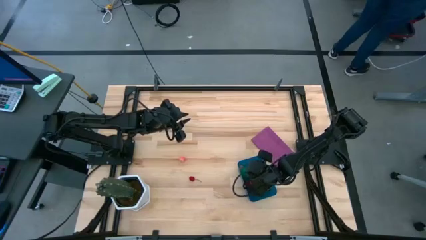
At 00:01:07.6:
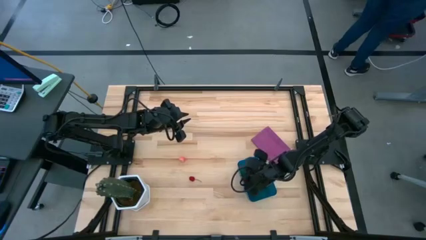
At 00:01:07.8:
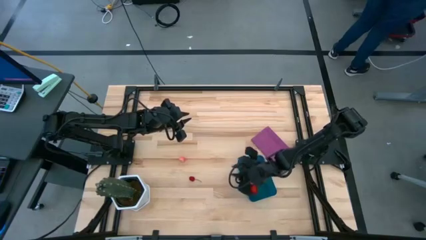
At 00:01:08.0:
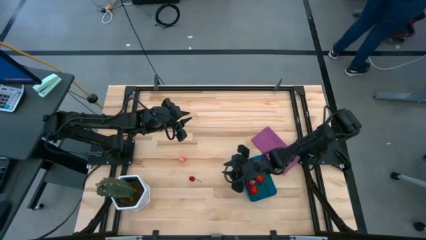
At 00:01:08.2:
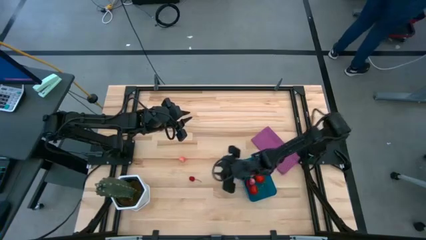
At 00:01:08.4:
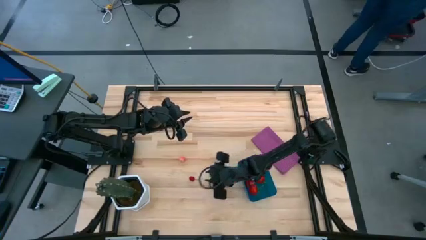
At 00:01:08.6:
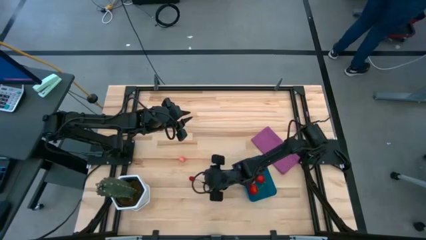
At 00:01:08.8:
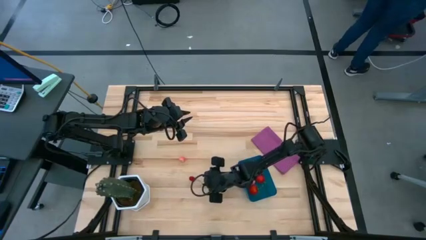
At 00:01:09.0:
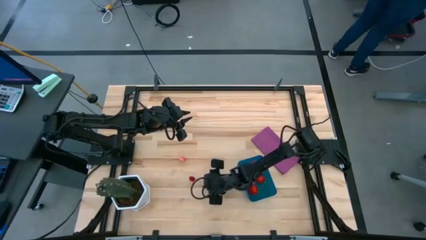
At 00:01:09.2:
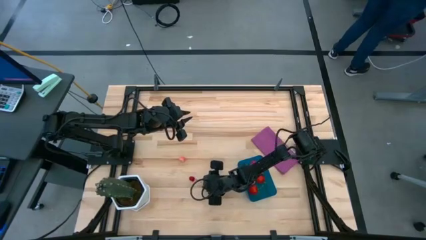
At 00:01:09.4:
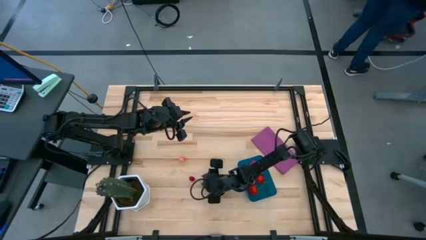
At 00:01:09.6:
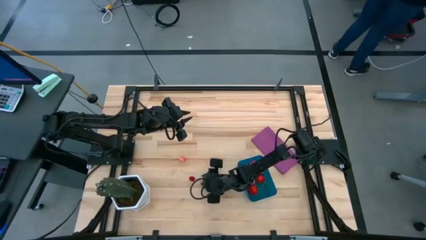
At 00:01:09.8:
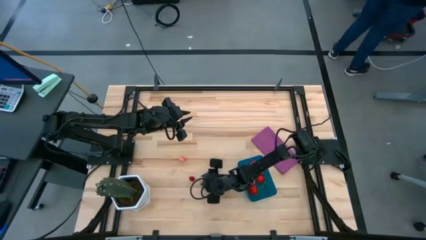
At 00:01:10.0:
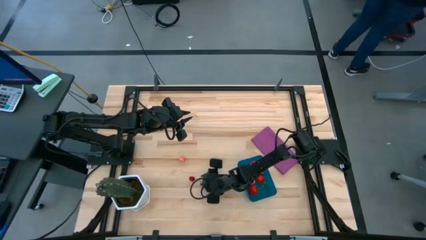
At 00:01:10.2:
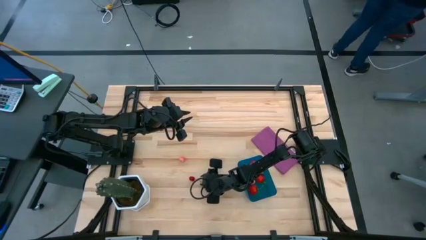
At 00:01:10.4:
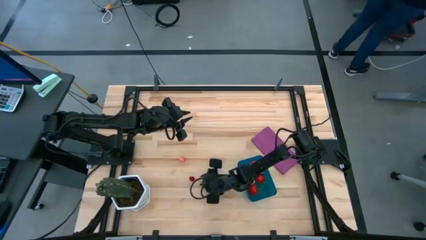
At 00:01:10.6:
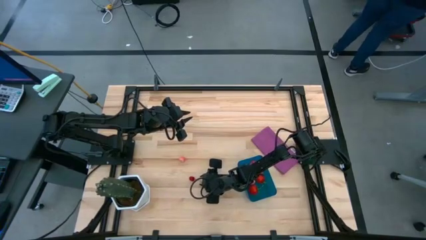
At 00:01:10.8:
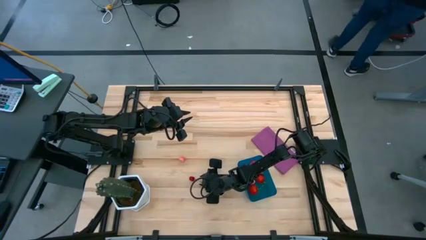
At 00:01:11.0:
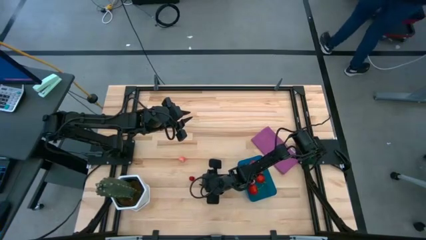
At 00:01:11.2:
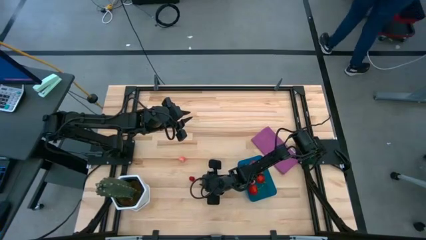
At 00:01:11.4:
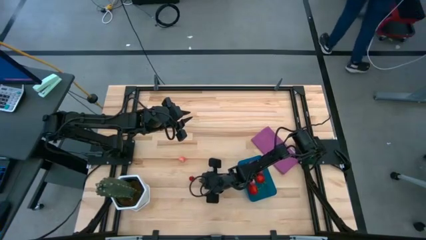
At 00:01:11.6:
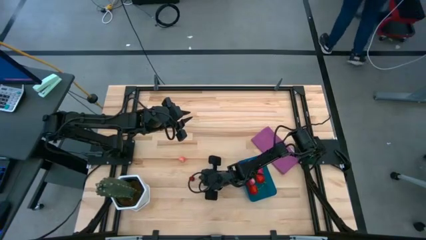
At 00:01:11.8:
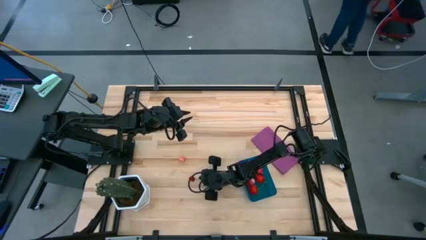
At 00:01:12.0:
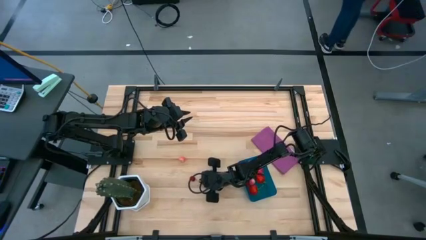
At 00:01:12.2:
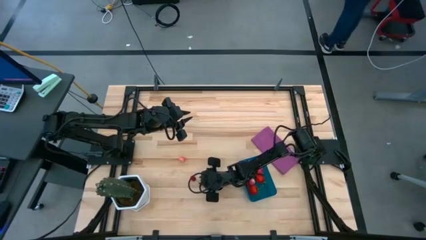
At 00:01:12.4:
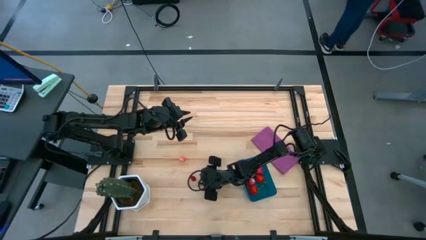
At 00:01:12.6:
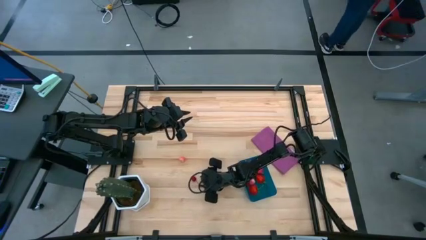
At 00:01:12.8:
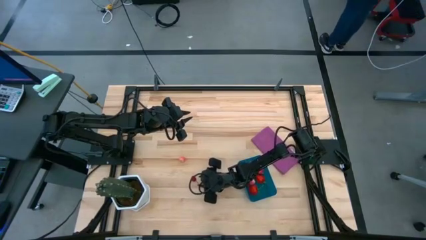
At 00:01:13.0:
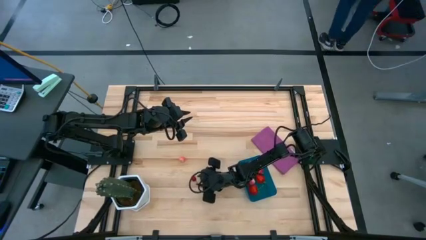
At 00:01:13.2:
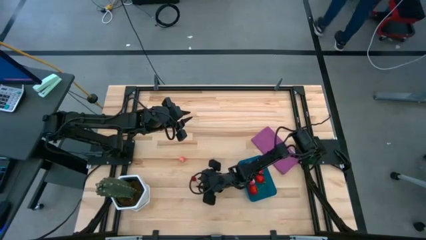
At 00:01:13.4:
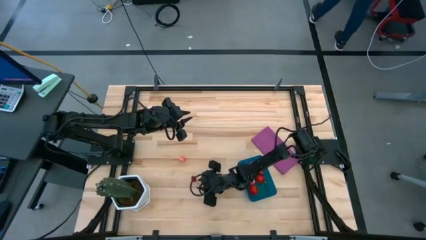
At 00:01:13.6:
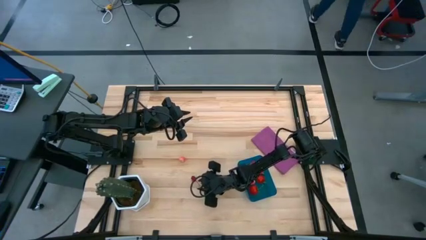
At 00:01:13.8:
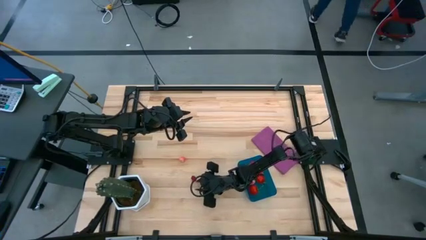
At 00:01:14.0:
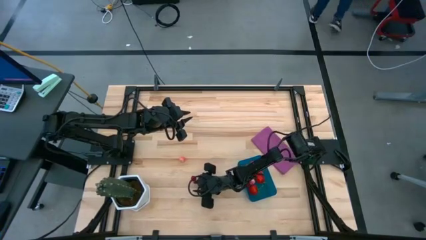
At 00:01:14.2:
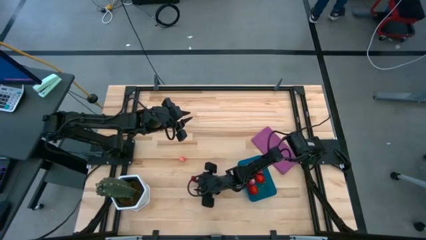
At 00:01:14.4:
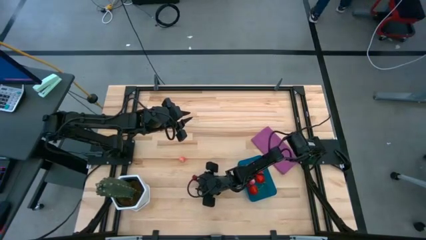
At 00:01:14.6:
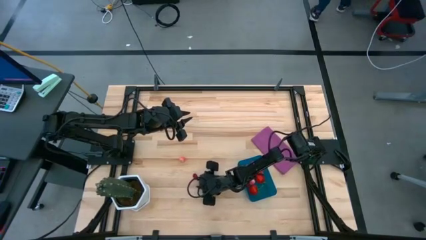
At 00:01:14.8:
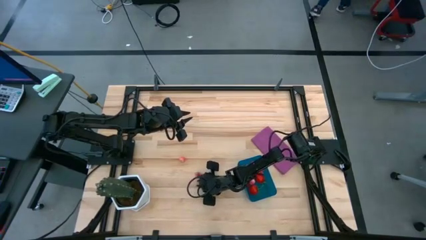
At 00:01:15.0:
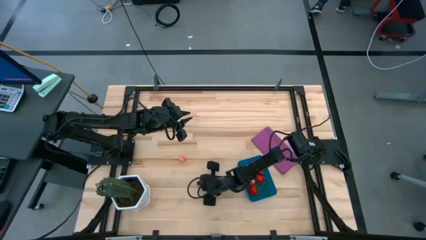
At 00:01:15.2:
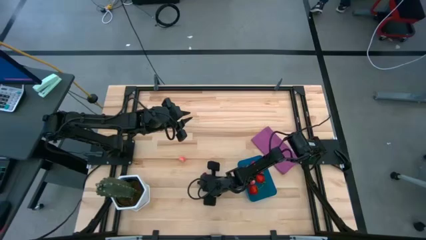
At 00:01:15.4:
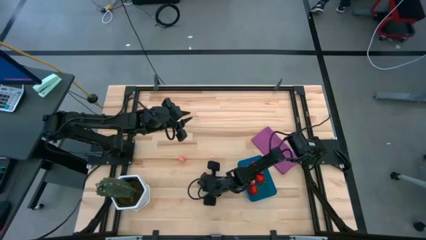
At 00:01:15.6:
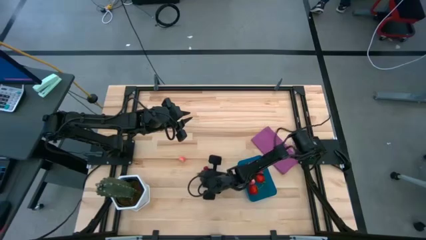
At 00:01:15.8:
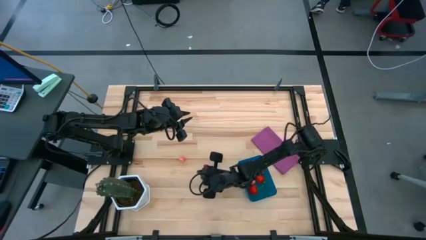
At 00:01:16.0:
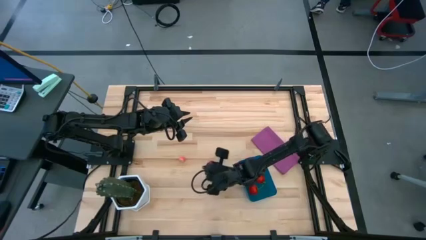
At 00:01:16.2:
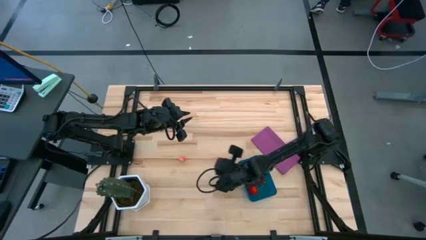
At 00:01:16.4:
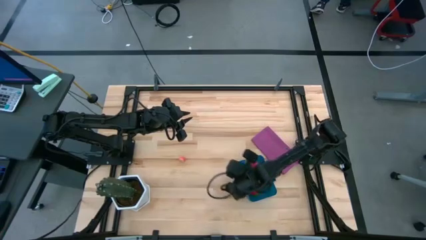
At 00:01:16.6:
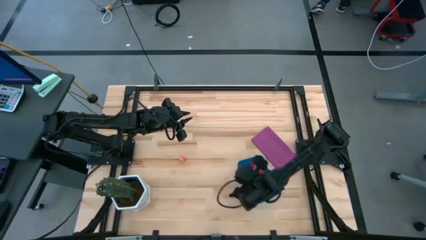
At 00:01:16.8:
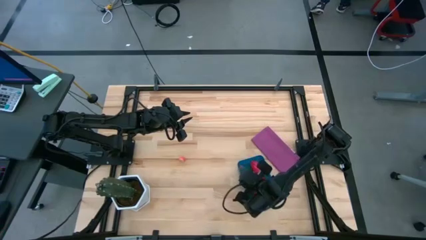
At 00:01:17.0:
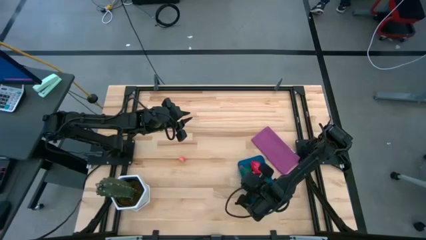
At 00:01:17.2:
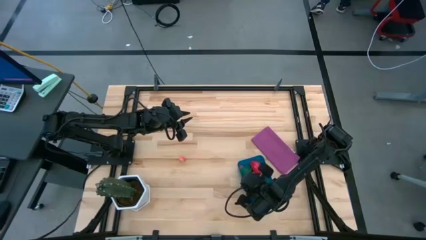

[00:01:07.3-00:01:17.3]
Task: Pick and placing Produce into tupperware
Put the red cherry into the blue bin

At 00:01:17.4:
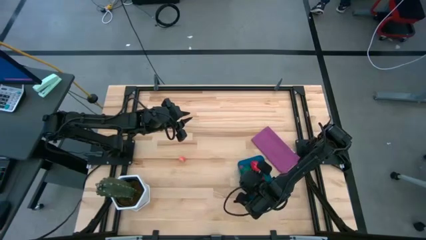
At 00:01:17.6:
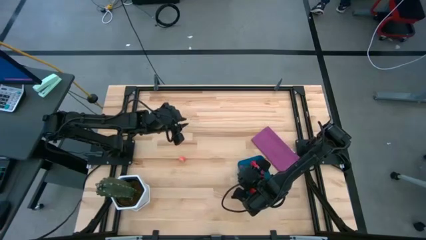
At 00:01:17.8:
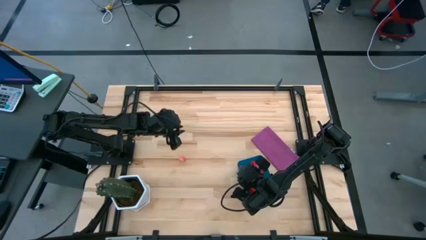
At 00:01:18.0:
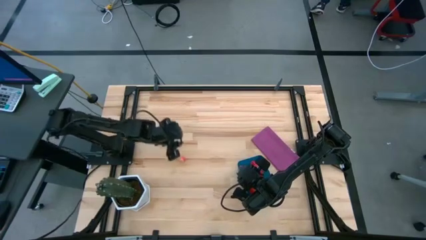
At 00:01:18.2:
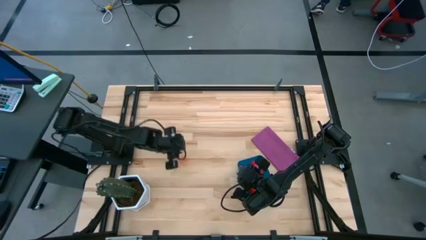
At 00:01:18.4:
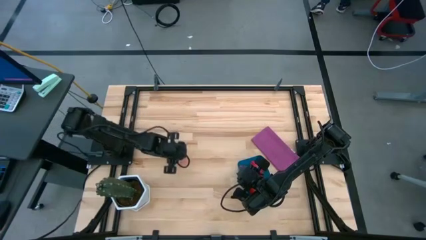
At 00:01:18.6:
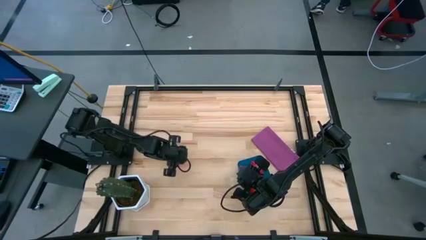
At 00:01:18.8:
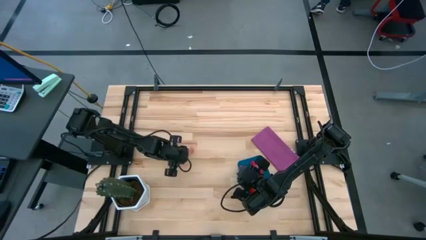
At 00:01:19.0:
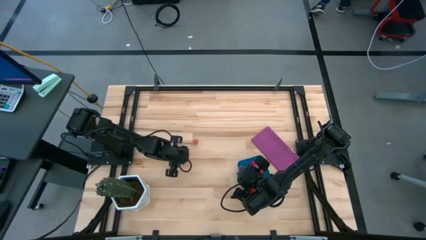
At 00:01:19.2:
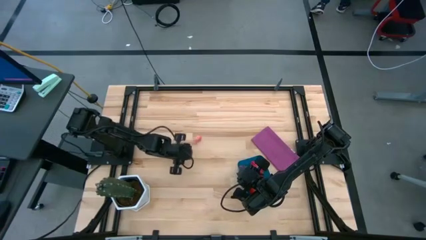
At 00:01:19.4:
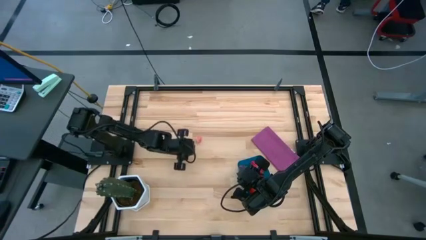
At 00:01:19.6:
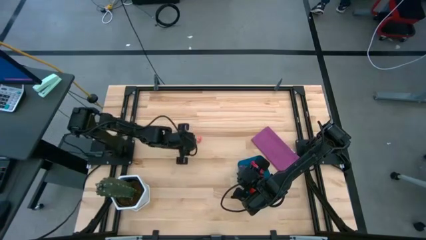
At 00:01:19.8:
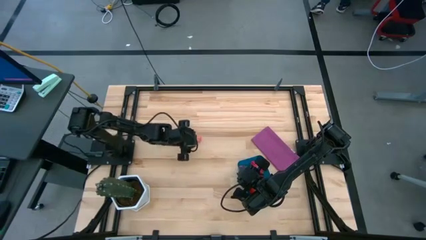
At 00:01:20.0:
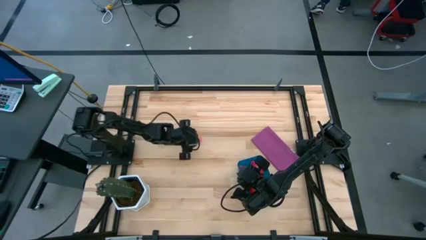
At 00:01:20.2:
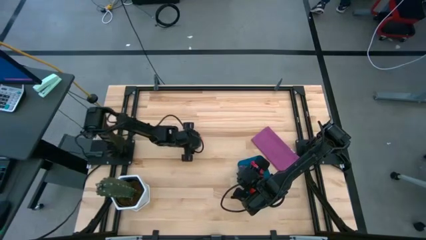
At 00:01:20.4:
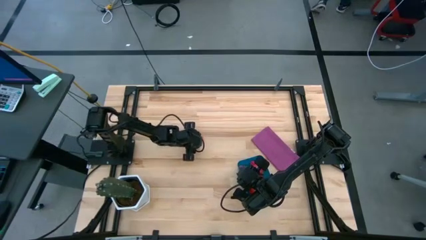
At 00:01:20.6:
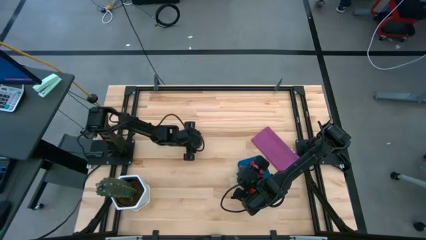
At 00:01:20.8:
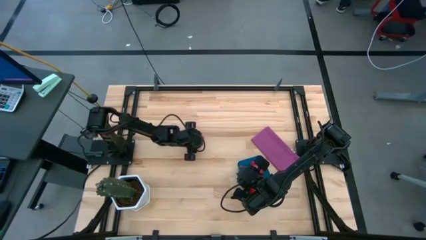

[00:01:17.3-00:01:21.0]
Put the pink peach into the blue bin

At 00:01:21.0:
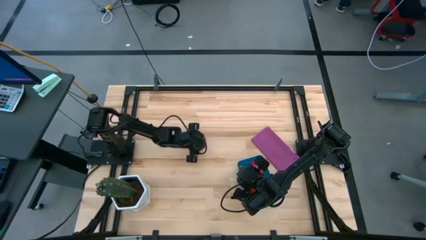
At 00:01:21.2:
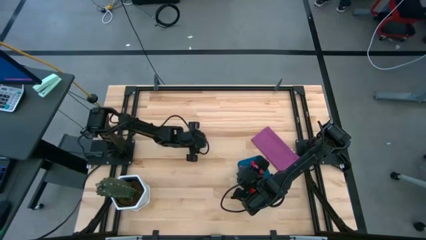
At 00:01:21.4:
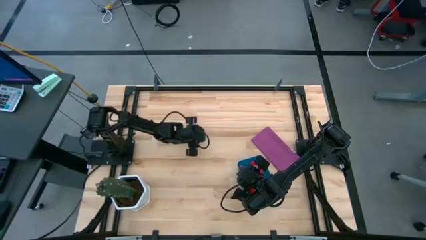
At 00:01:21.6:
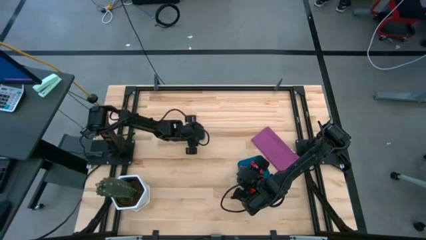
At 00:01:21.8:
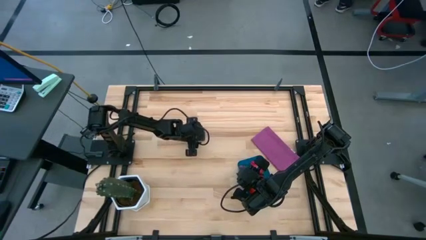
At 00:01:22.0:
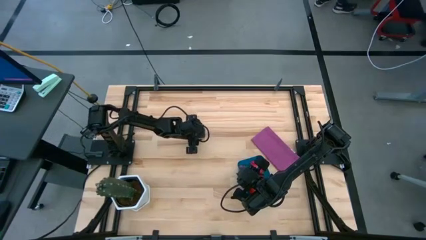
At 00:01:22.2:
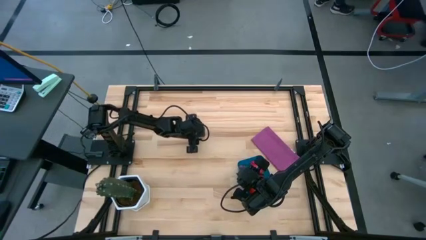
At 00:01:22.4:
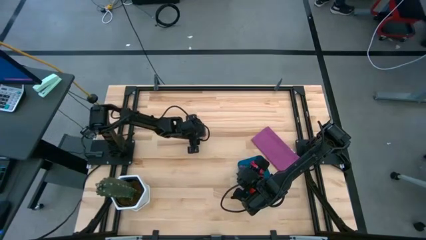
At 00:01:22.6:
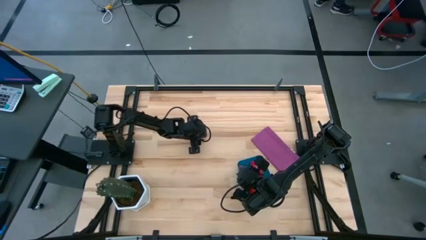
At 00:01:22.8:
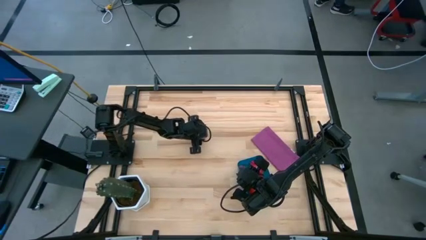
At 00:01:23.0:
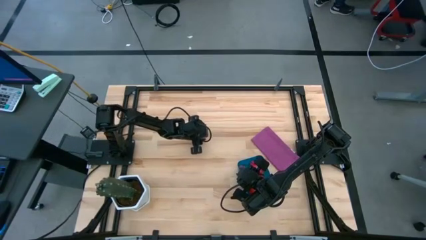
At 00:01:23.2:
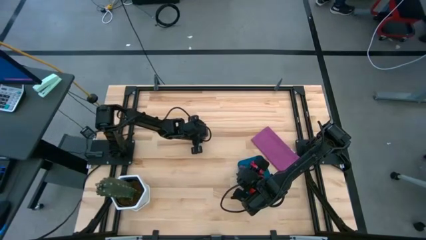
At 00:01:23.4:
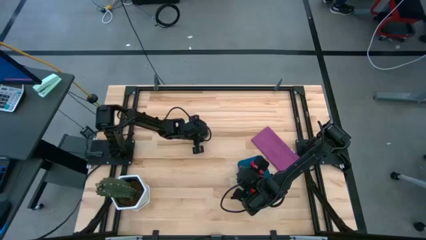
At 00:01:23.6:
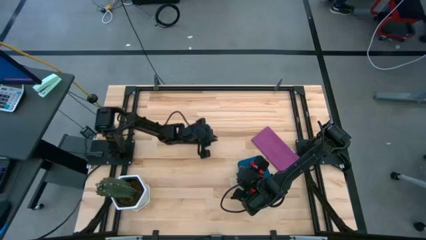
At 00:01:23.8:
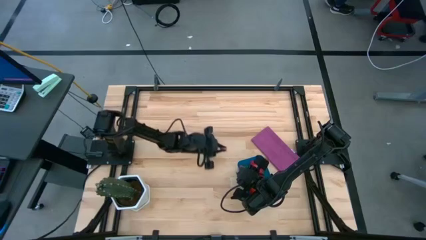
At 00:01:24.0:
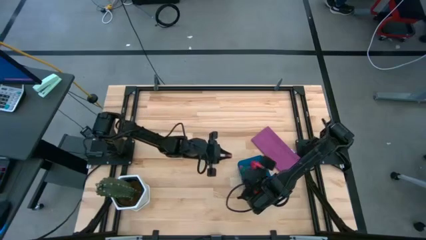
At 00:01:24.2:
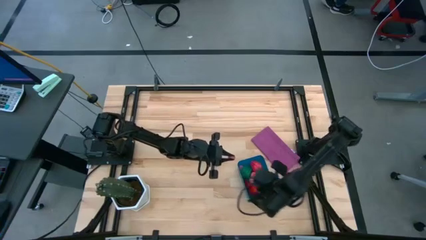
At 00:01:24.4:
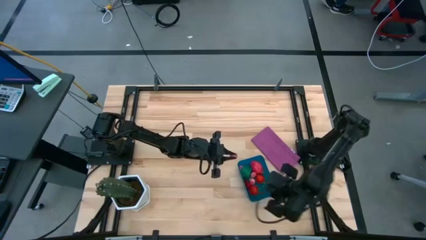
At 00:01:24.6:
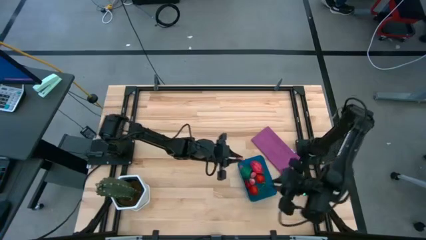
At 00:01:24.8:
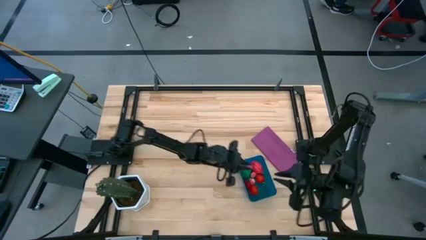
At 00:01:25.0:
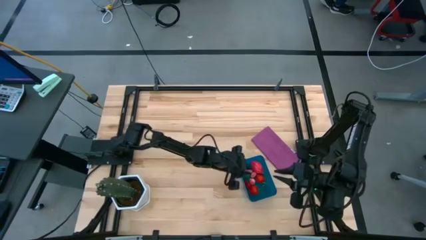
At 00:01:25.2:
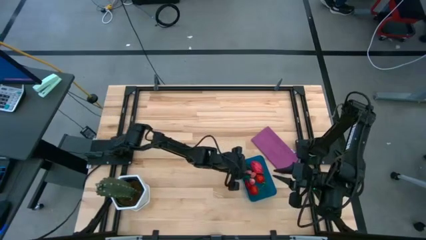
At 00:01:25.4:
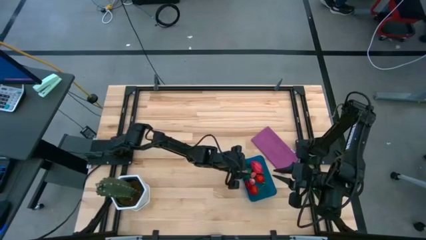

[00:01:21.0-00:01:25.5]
Put the pink peach into the blue bin
